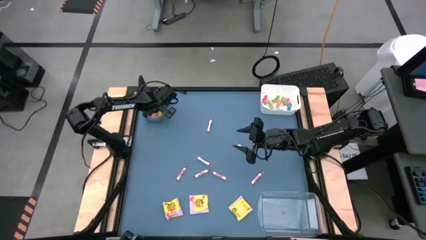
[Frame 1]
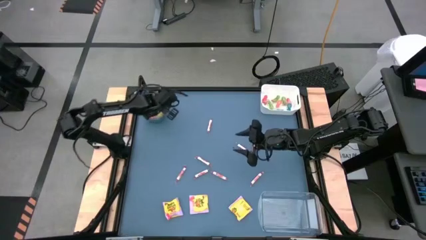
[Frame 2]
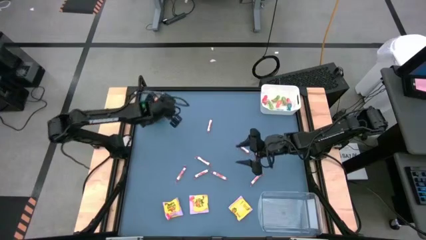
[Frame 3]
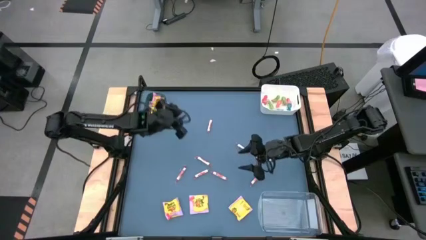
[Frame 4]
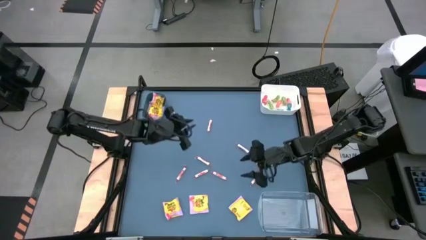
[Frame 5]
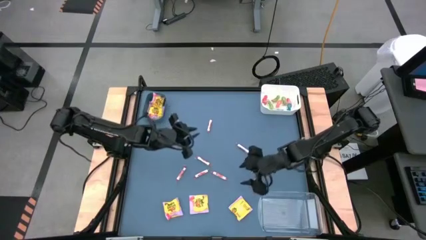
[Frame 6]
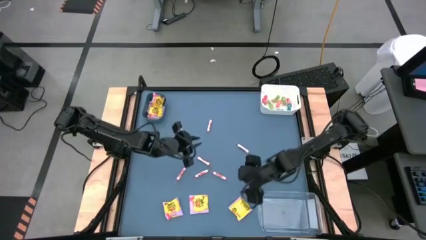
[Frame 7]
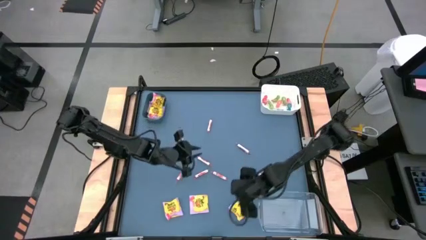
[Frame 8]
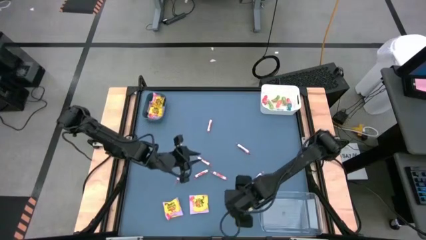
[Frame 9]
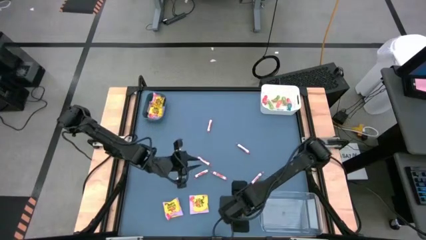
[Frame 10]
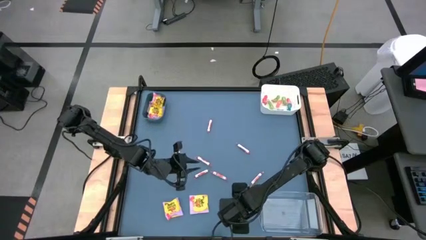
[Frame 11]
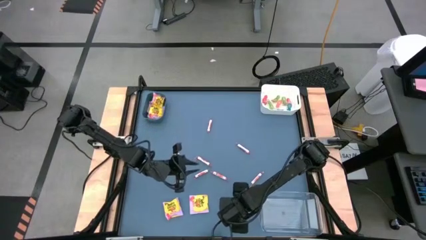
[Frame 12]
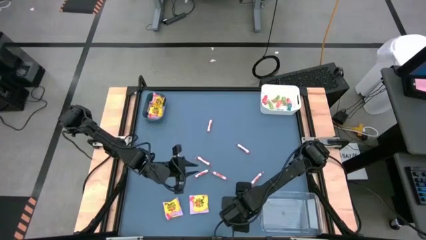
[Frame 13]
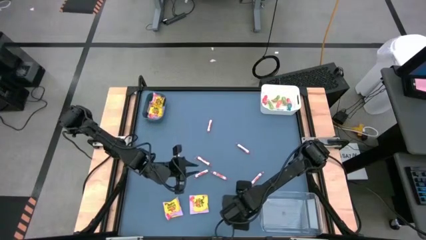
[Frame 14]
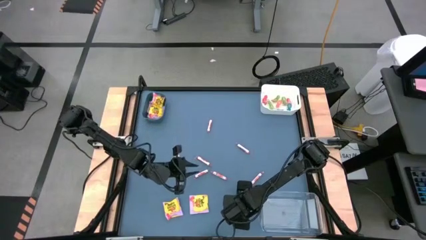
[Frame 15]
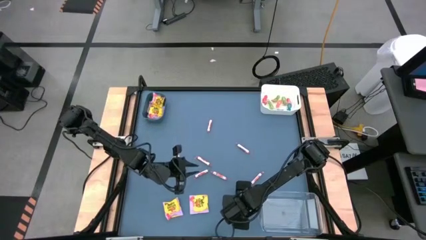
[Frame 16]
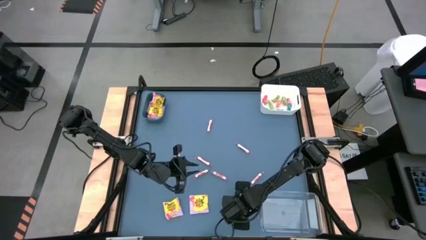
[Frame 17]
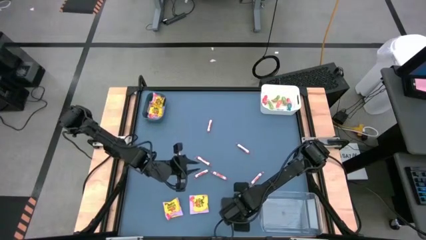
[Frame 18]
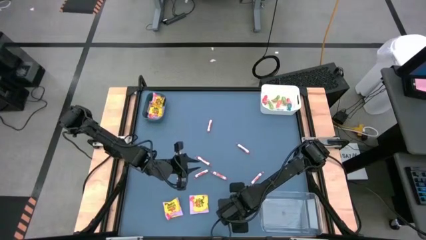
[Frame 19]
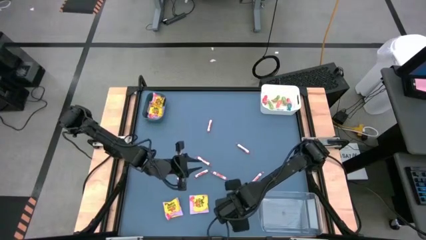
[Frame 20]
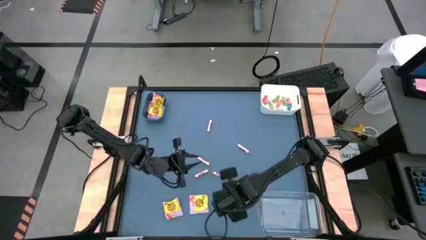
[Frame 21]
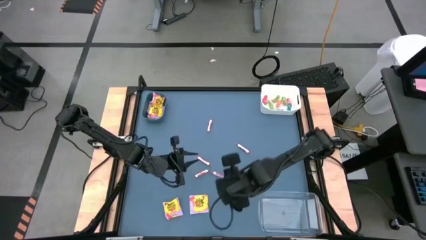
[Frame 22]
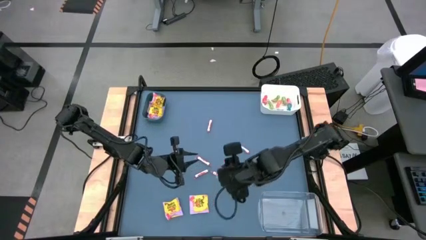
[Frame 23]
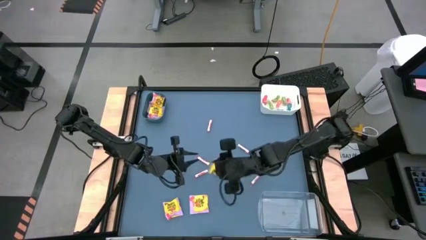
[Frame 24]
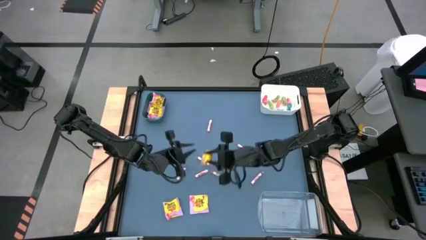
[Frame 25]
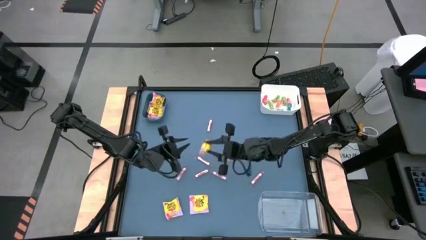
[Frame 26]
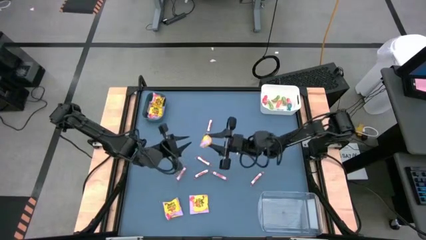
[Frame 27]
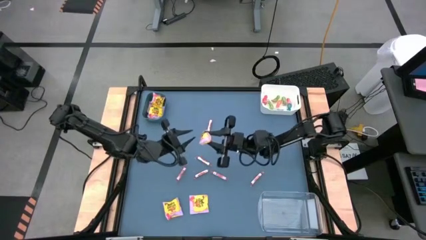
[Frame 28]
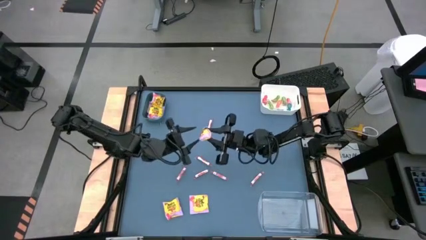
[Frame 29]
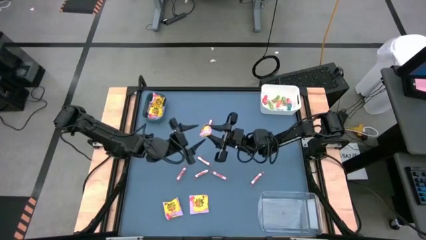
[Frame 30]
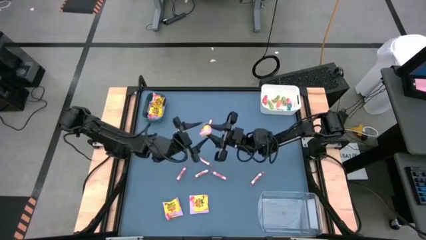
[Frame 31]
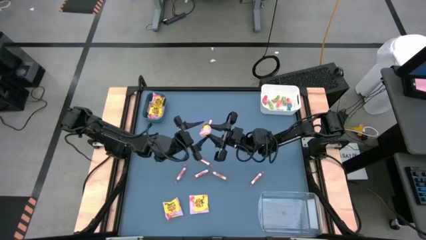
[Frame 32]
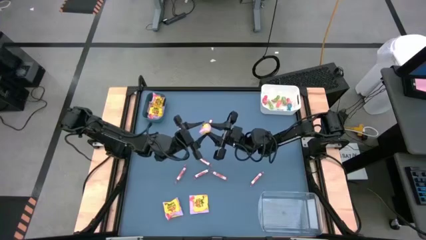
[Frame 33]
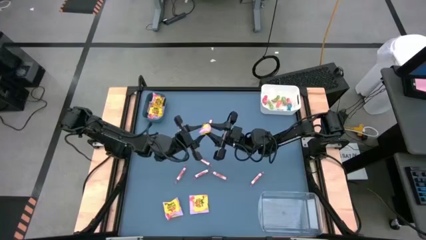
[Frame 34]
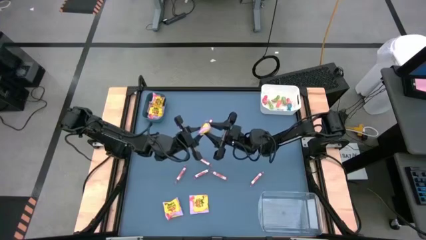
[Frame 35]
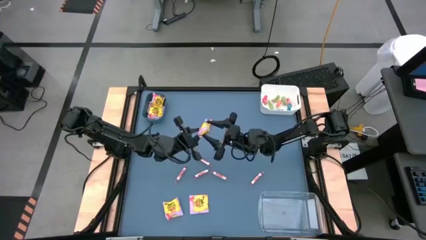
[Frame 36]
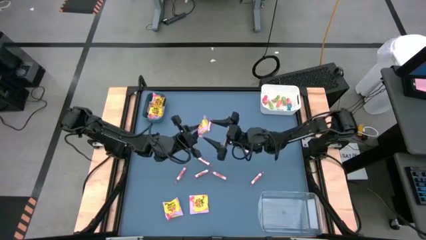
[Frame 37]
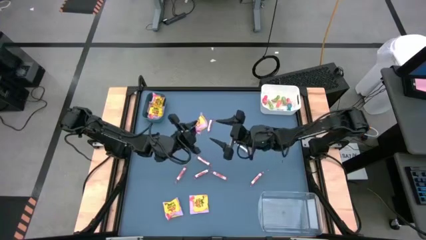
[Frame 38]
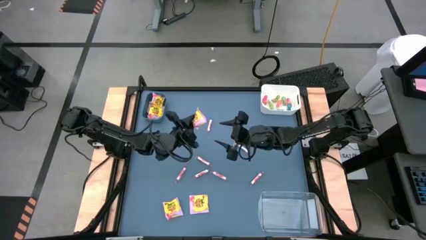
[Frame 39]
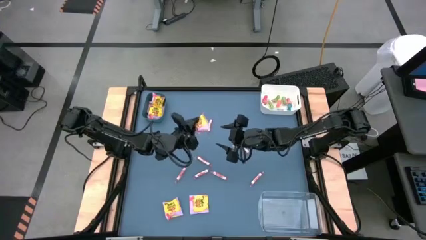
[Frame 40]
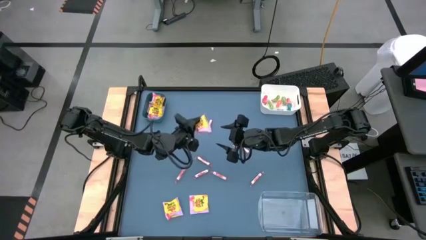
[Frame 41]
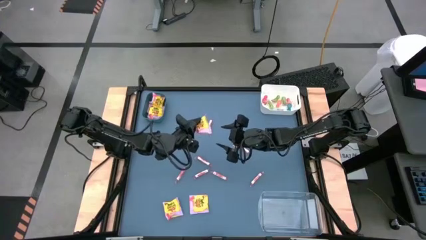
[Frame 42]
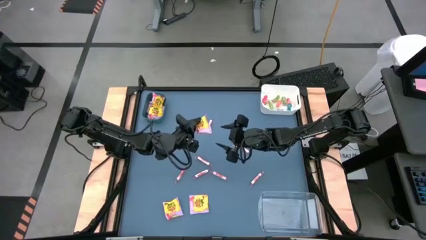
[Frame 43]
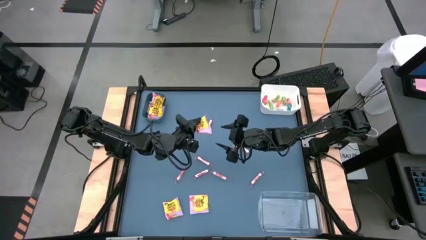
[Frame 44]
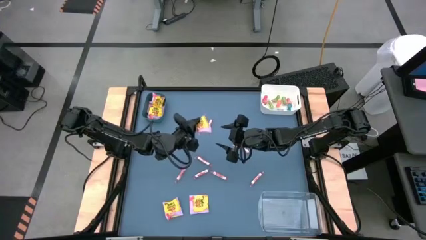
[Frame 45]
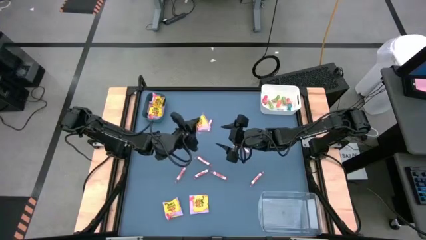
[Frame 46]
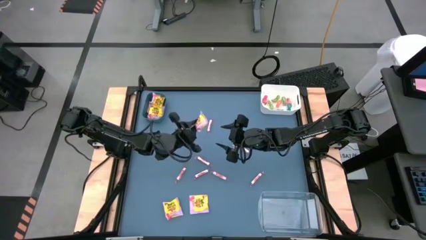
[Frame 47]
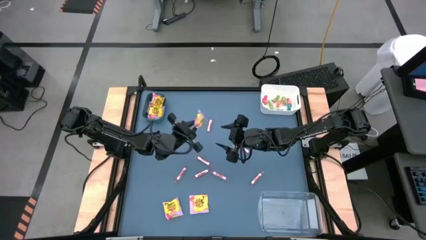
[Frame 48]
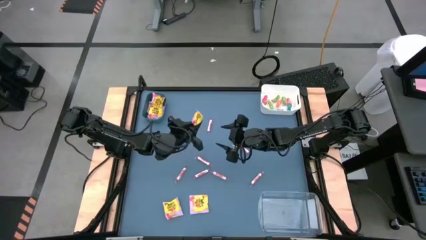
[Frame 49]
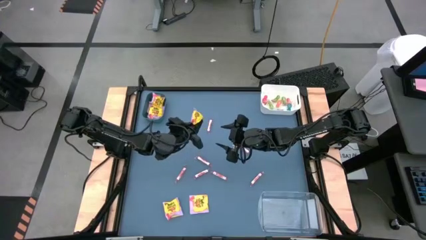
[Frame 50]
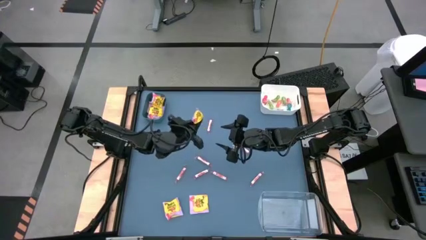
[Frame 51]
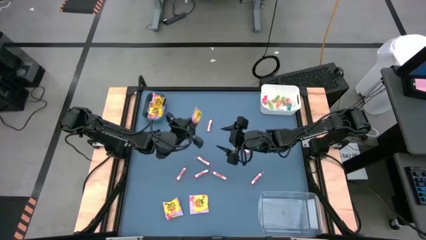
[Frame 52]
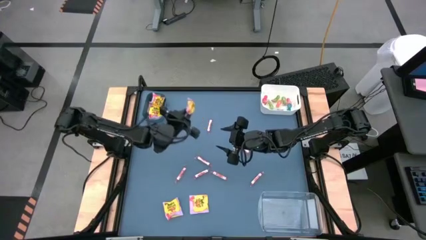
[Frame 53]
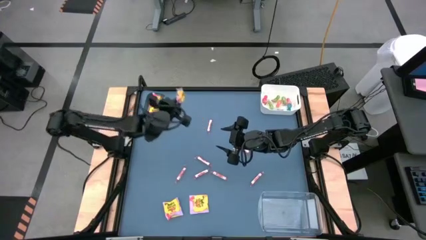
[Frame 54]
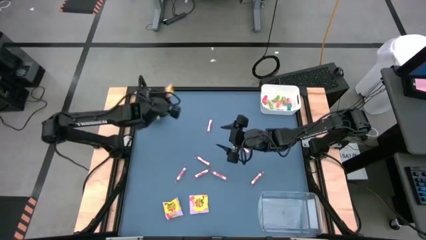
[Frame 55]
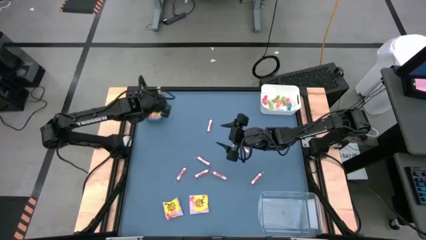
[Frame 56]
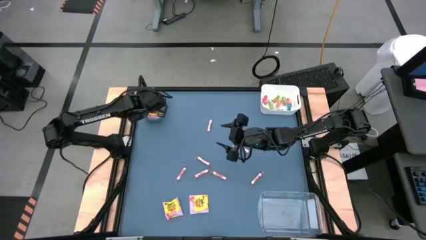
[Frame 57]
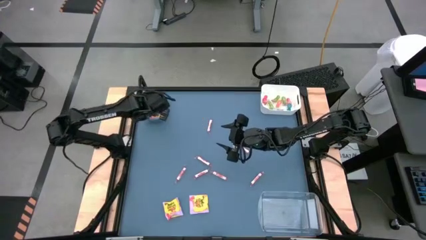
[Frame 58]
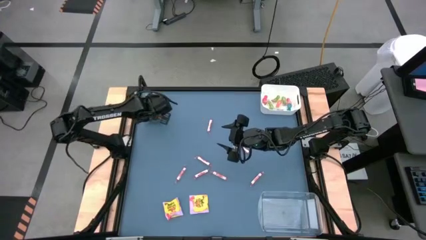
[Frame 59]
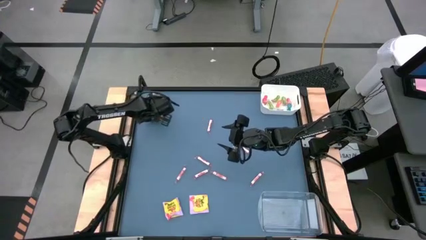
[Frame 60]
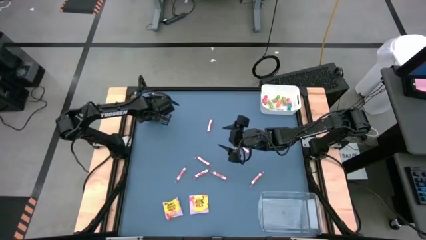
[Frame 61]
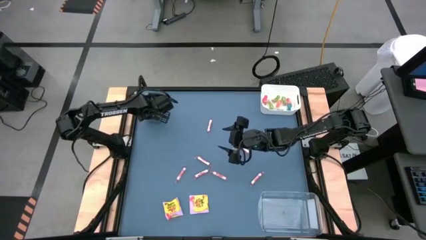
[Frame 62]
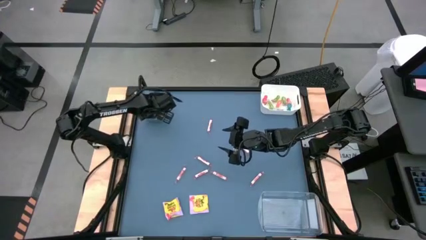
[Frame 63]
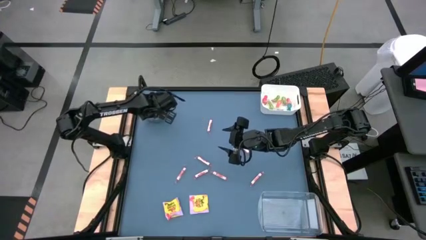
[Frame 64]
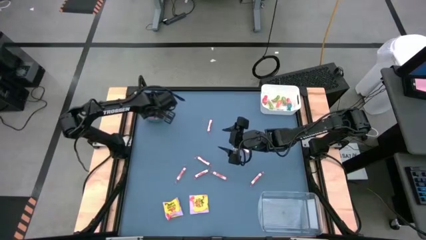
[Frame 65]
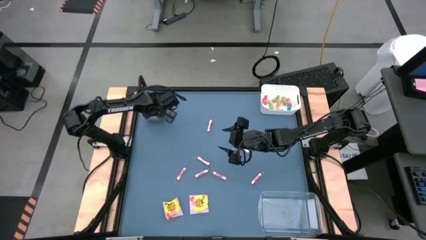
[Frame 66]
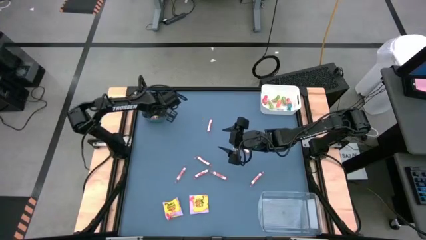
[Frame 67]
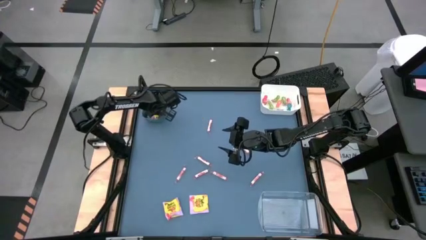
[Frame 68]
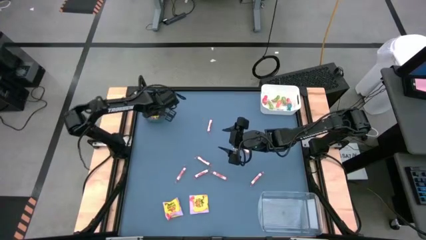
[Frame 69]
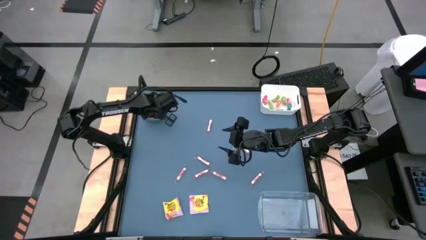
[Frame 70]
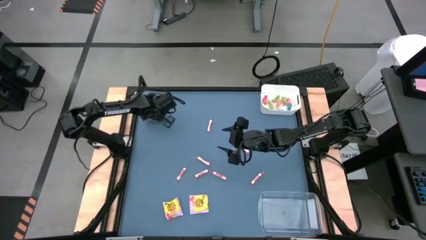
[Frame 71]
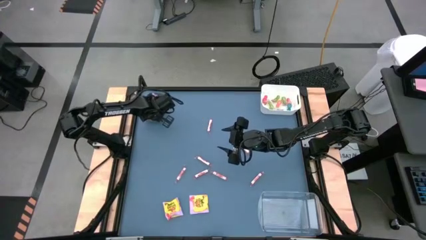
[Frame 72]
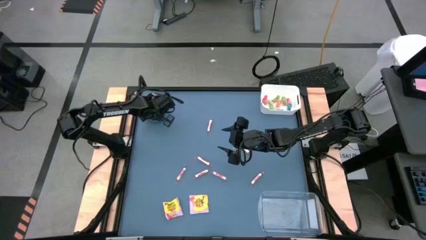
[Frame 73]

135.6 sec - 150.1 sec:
Task: Sort candy
Put the yellow candy pack into the blue bin
